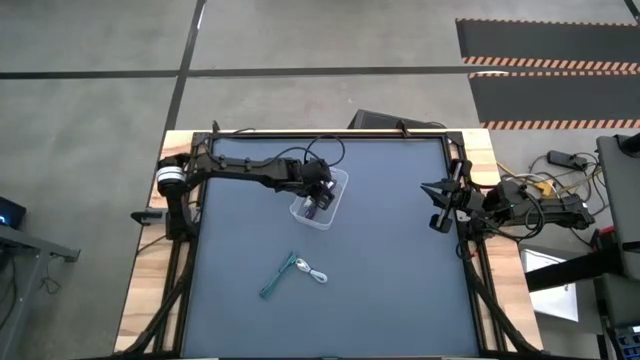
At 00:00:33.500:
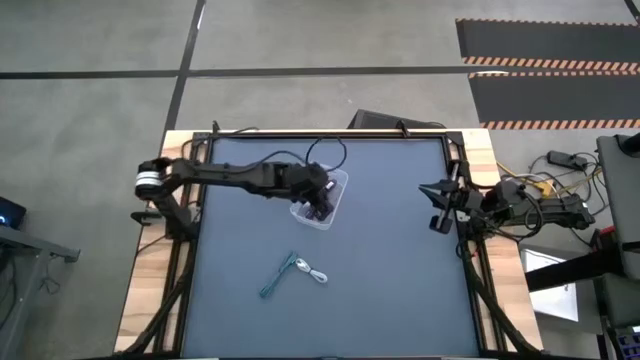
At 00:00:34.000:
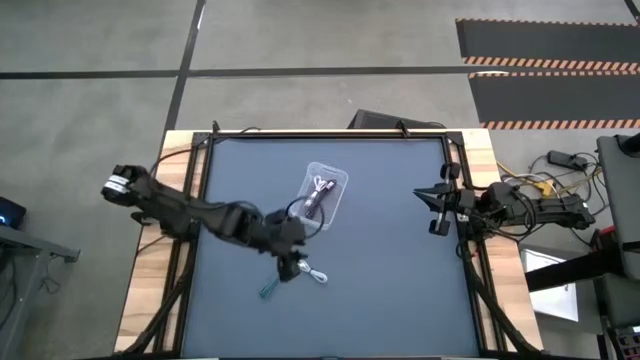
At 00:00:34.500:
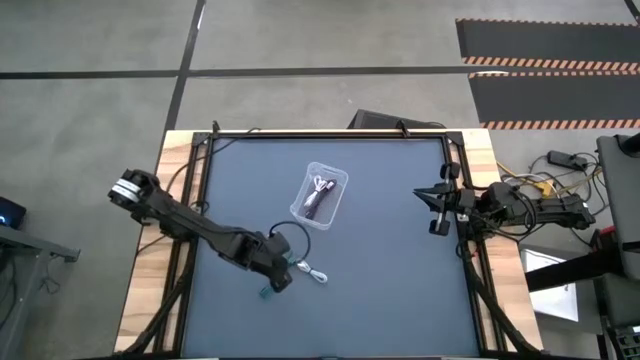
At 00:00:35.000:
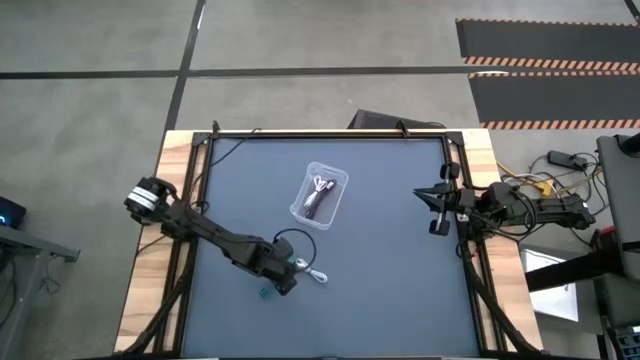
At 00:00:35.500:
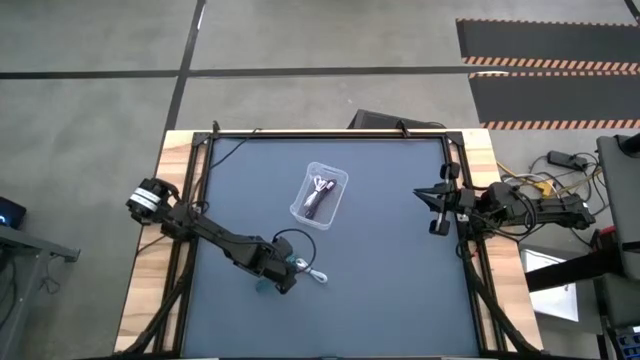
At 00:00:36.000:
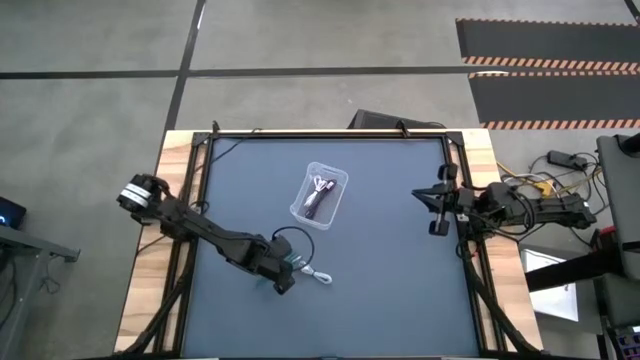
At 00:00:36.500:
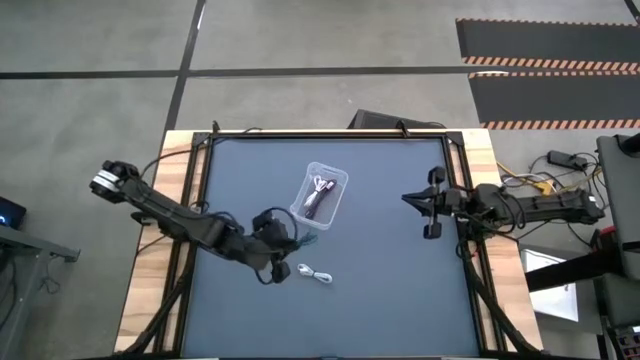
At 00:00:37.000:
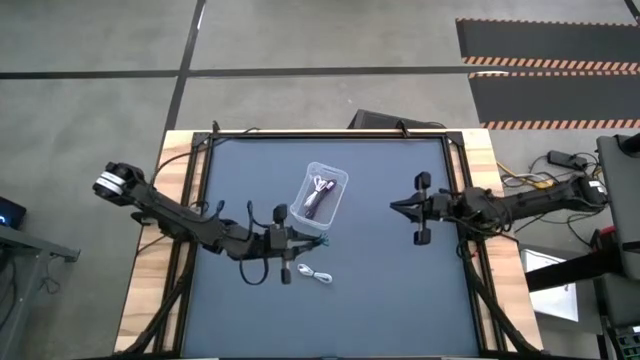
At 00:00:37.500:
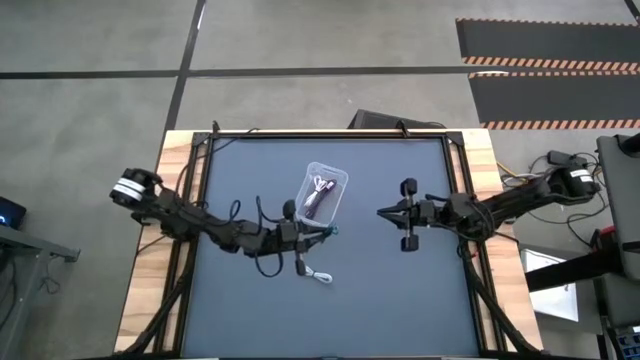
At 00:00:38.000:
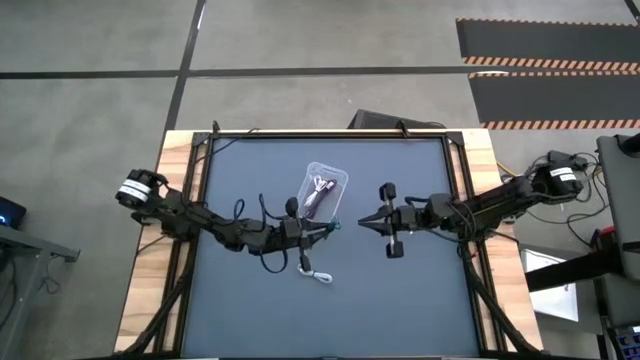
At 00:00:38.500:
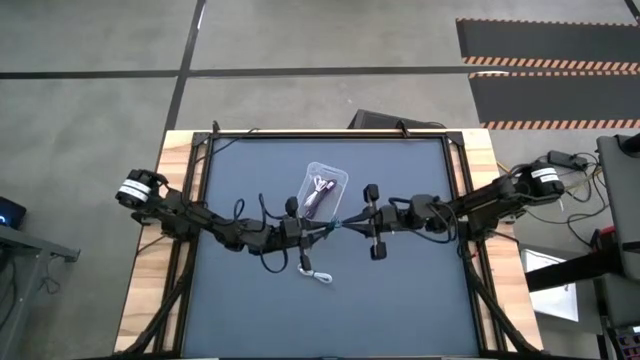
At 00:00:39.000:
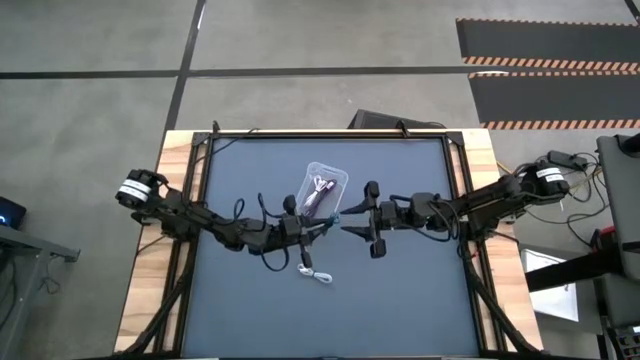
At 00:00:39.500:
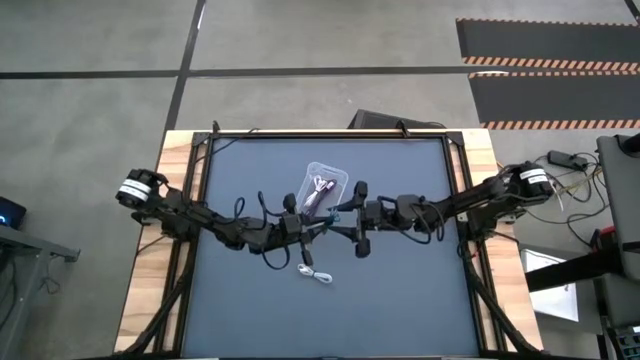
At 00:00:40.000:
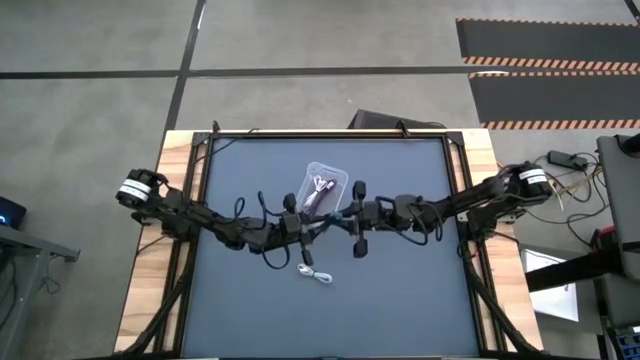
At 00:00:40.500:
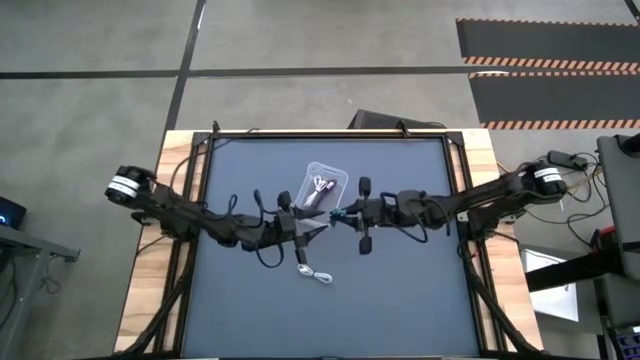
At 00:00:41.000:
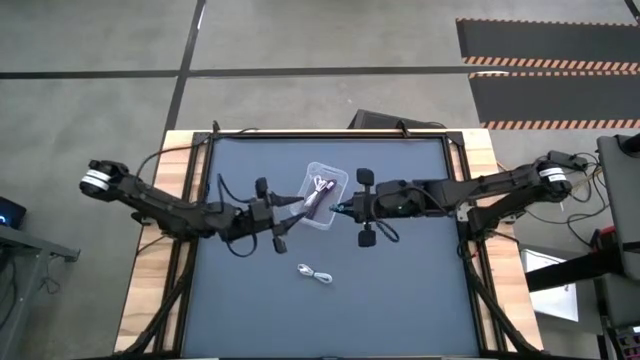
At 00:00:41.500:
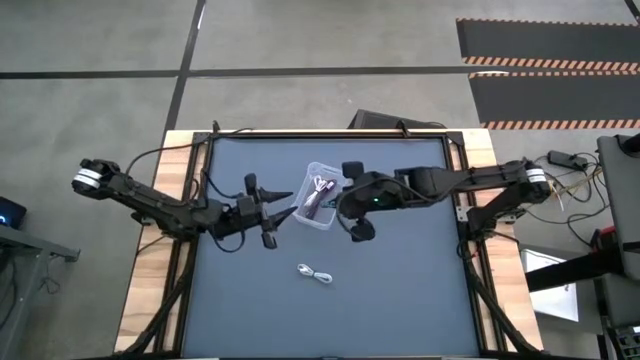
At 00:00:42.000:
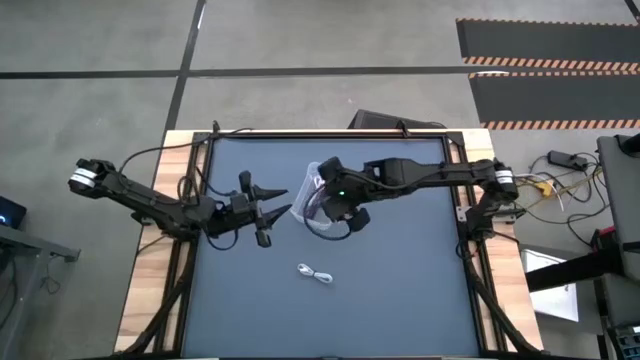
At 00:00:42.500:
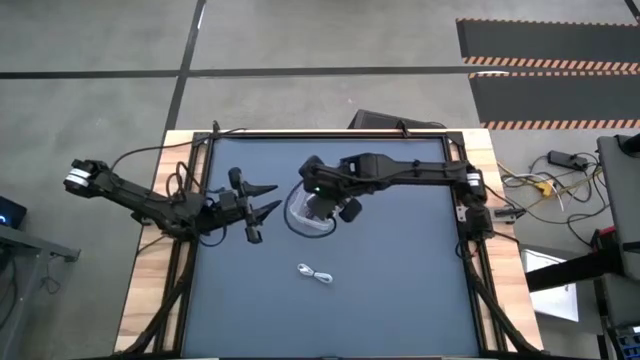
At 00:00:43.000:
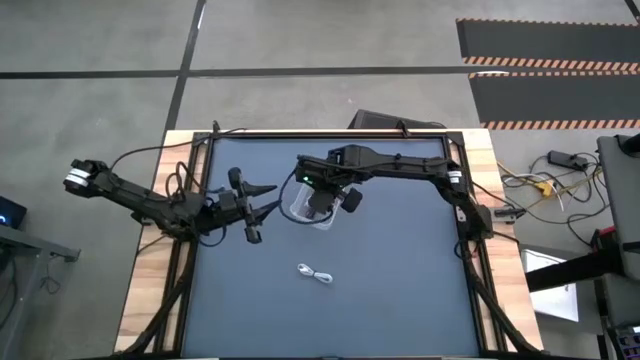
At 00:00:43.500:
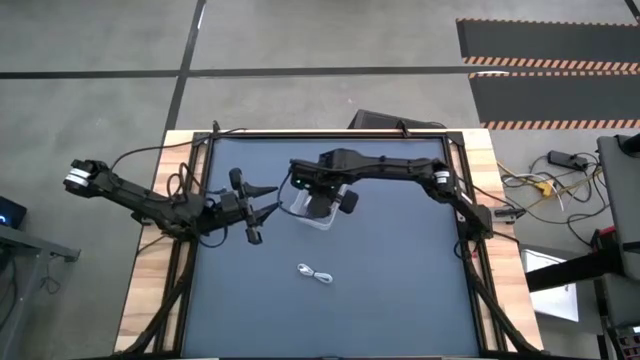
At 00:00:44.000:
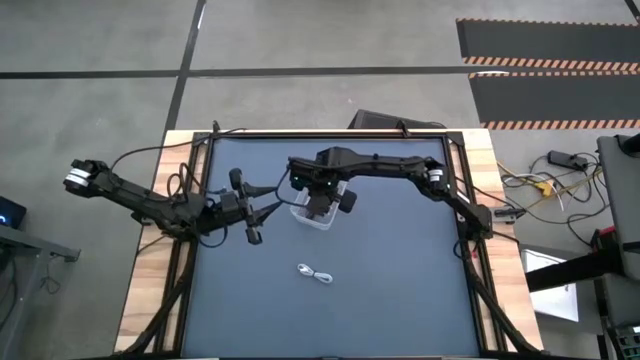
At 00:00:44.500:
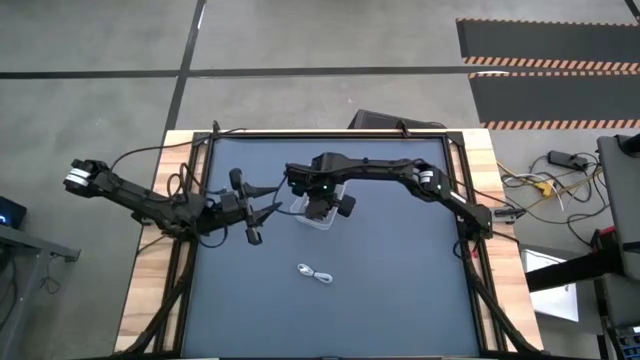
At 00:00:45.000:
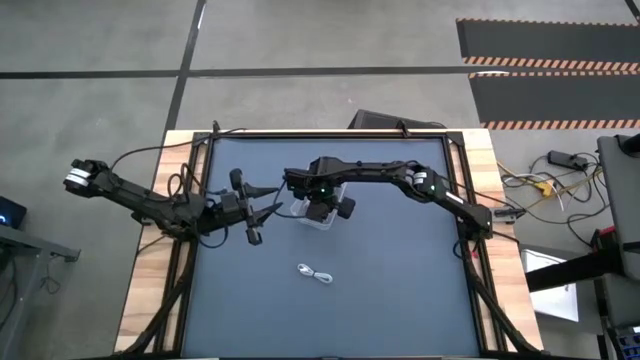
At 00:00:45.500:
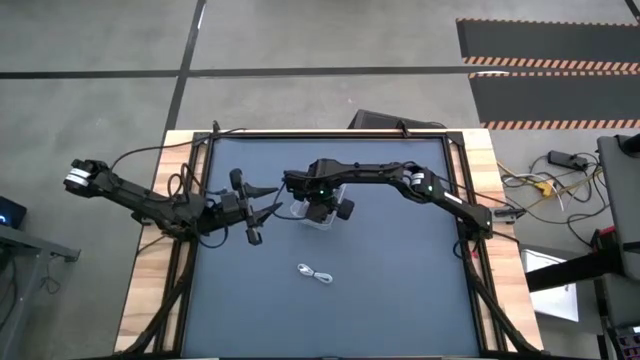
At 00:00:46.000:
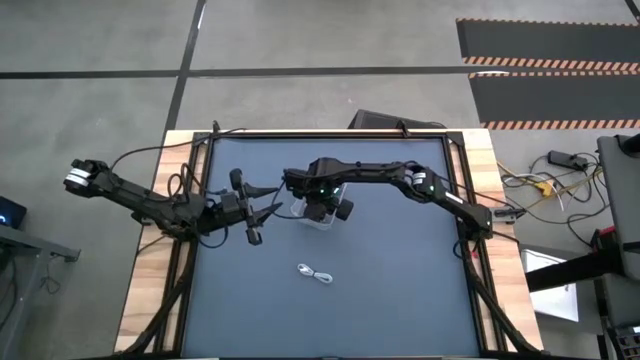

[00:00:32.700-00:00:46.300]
Task: Pick and place USB-C Cables
Put the blue USB cable into the transparent bin

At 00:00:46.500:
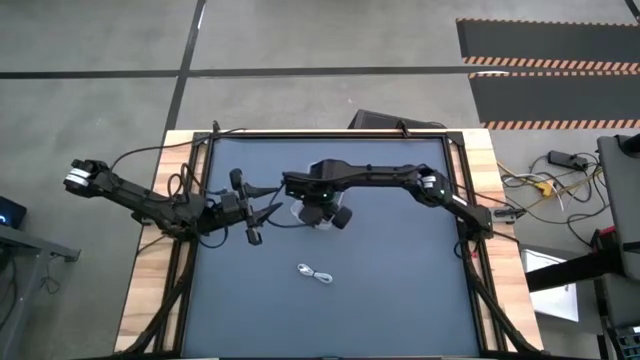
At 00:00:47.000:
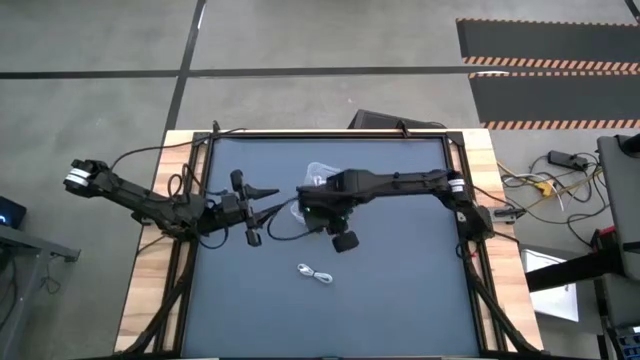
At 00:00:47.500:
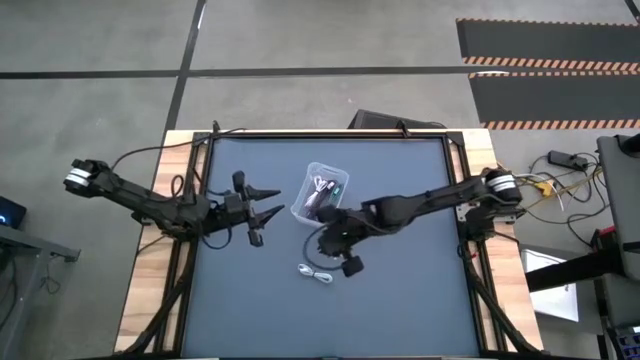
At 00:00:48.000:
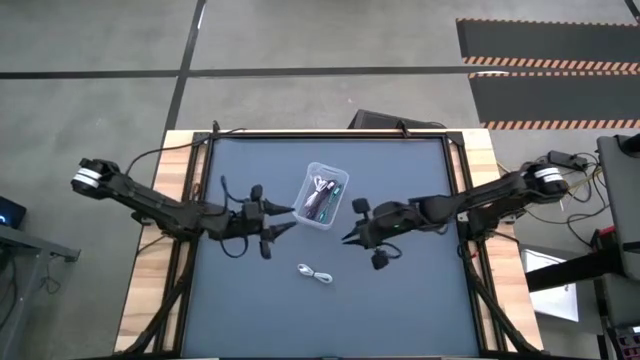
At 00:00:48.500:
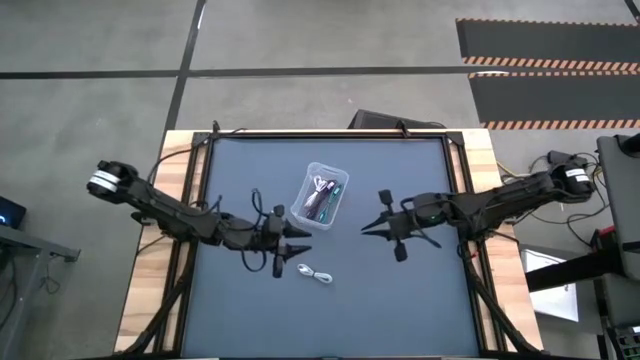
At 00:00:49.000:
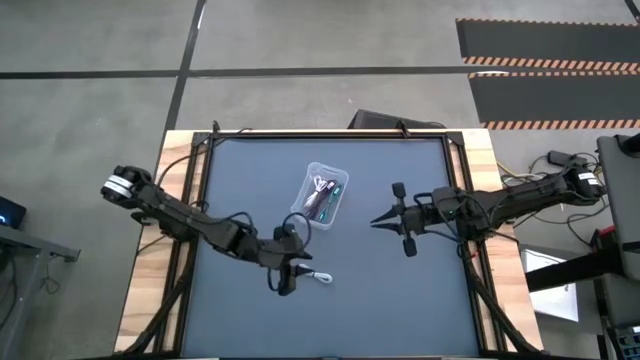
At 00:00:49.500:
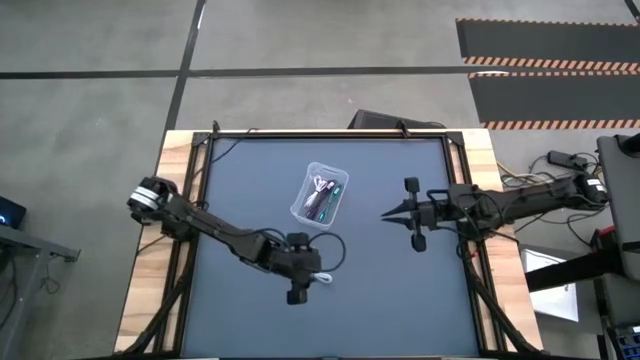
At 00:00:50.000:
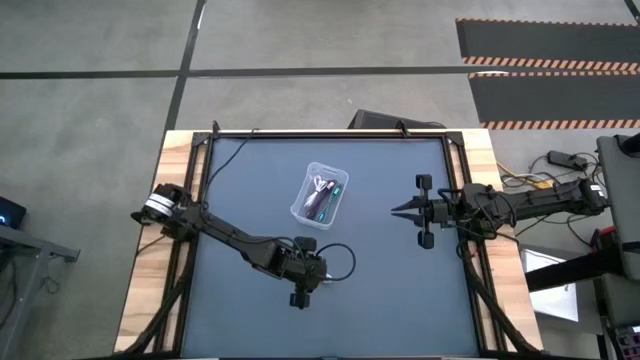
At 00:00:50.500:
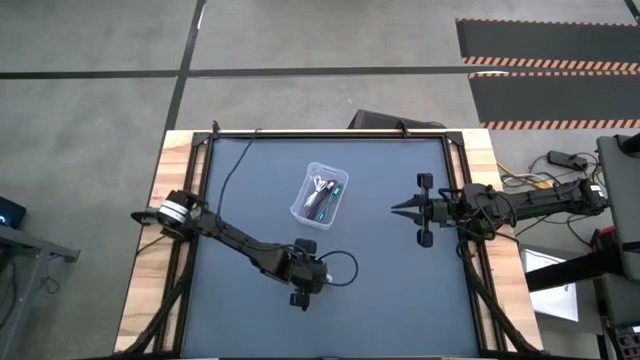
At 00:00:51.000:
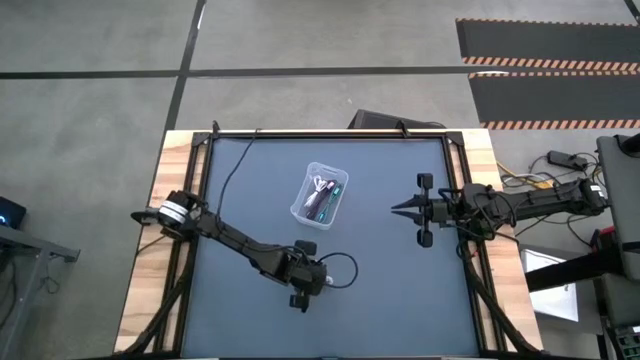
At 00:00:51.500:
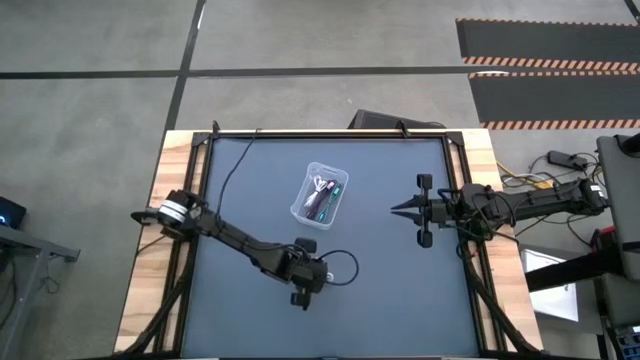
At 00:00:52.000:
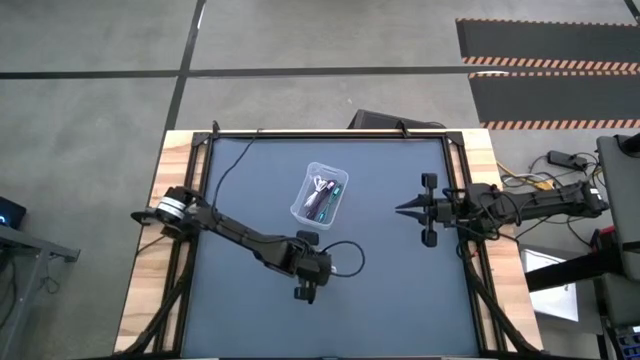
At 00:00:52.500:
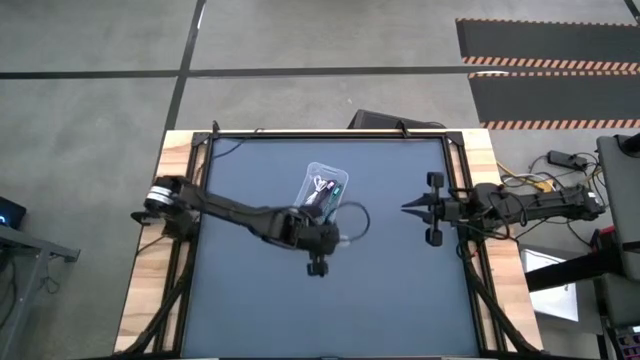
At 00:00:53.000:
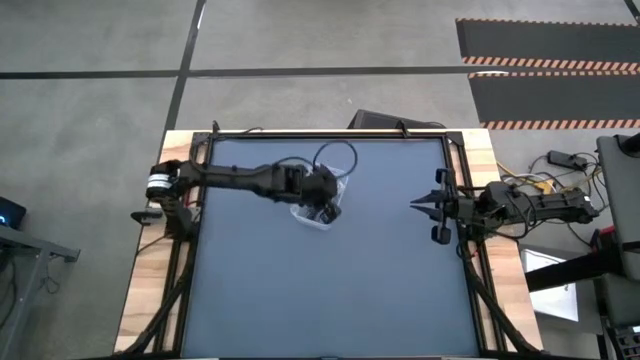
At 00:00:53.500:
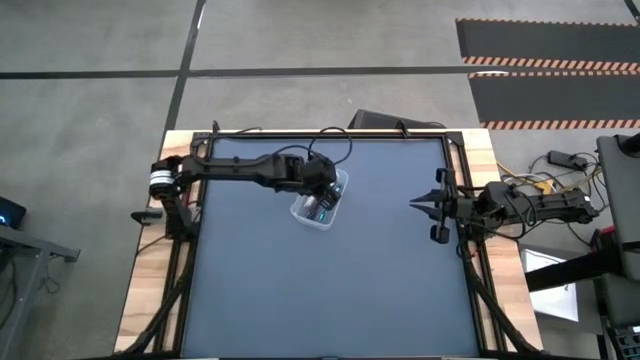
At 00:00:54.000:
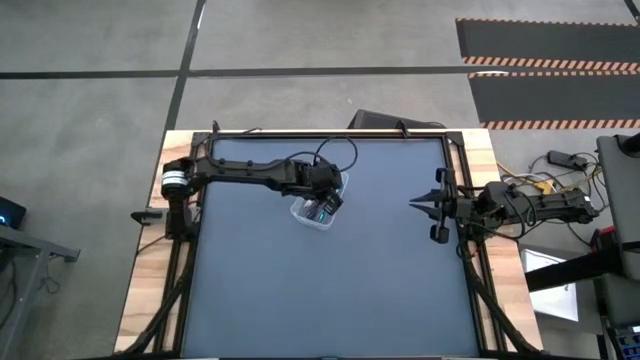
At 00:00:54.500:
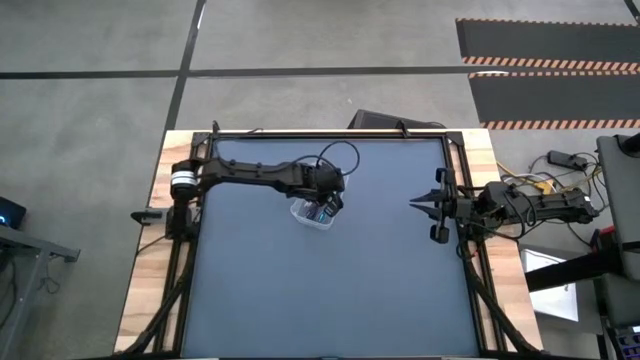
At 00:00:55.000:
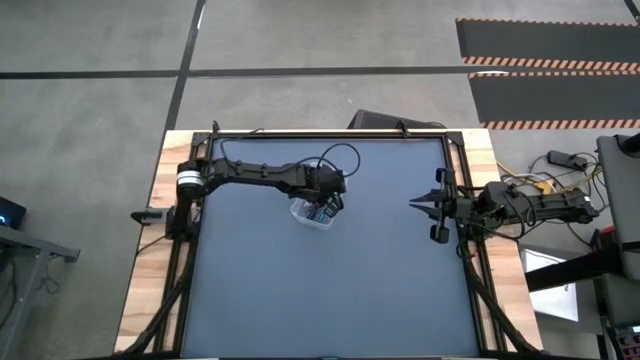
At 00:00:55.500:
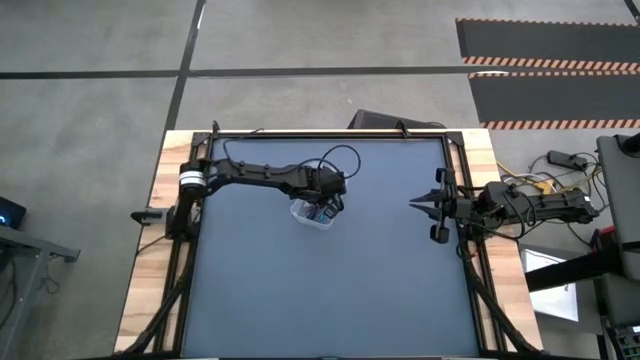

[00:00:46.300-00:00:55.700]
Put the white USB cable into the transparent bin
